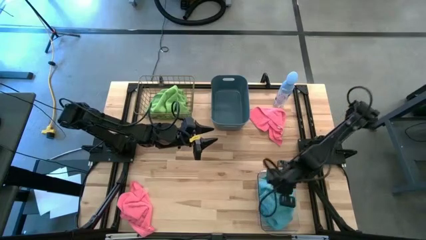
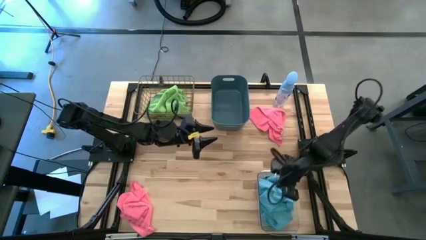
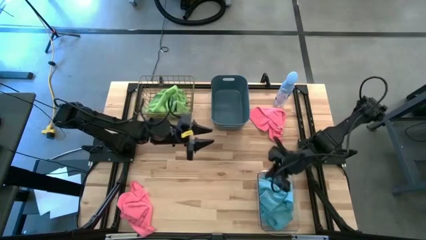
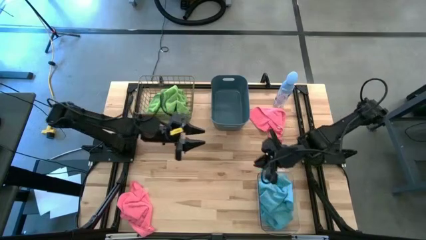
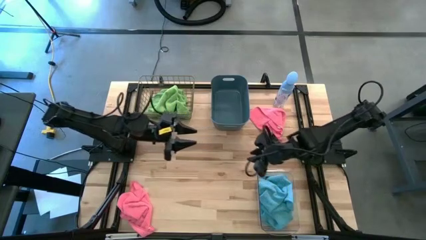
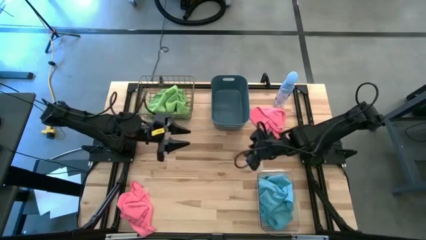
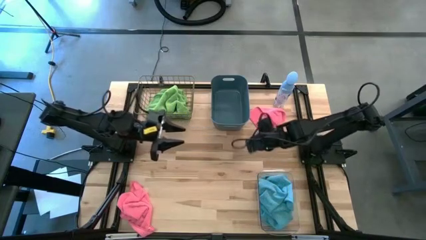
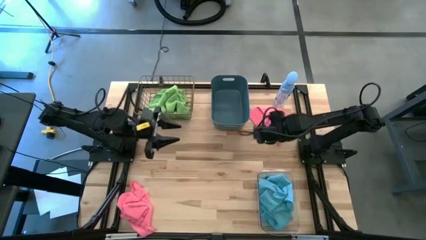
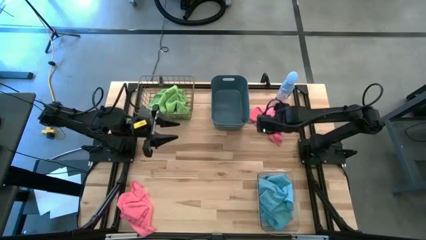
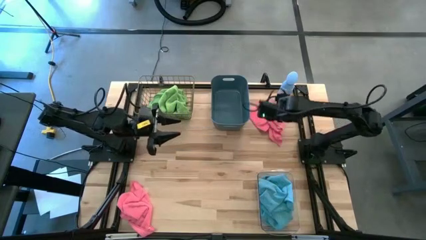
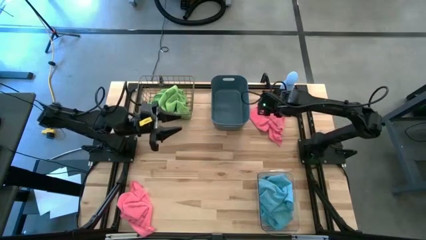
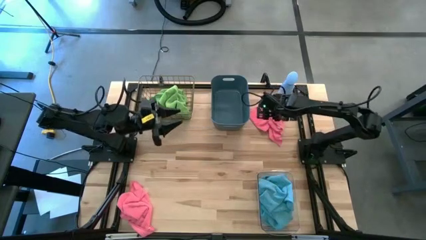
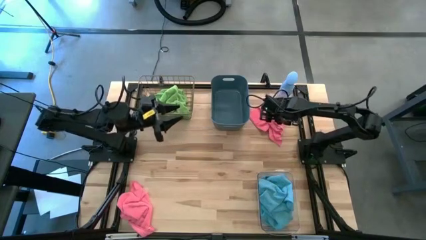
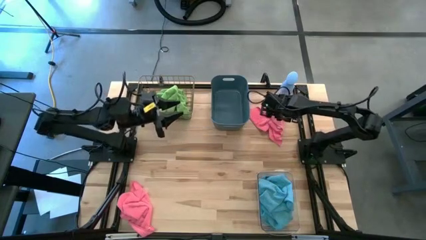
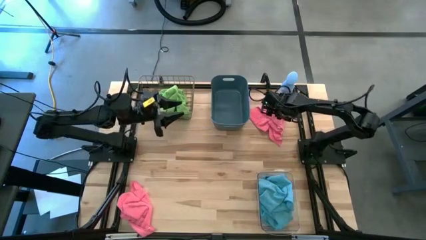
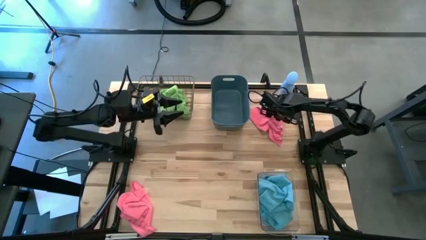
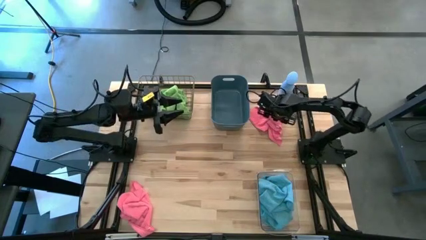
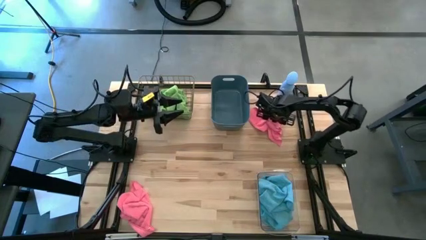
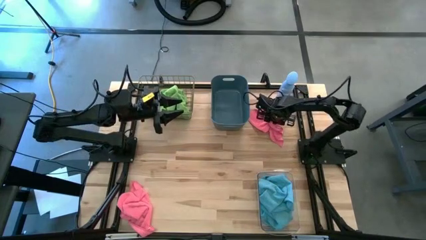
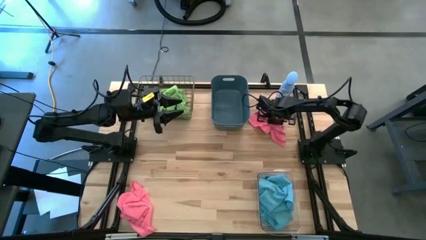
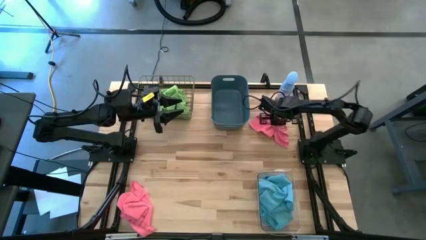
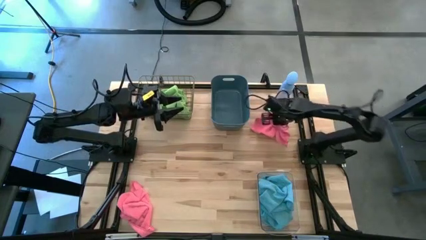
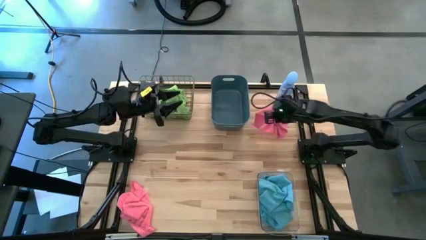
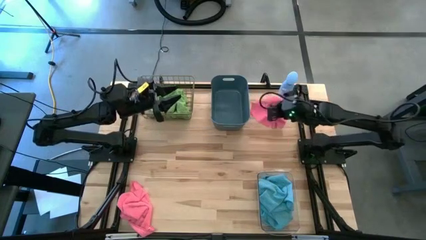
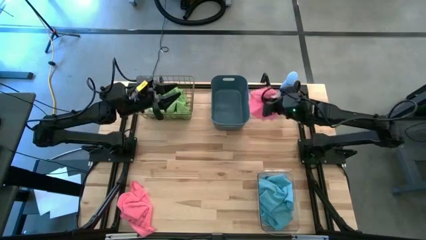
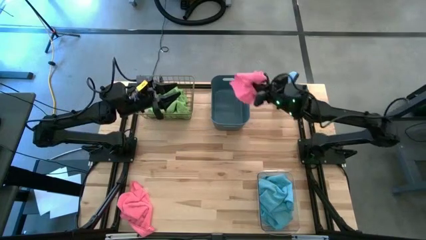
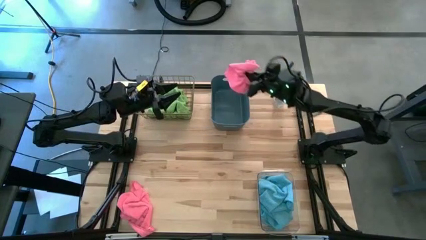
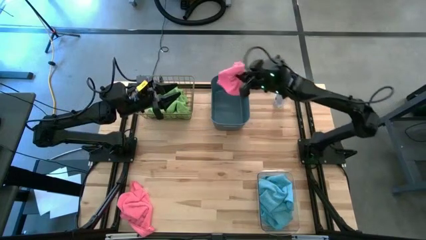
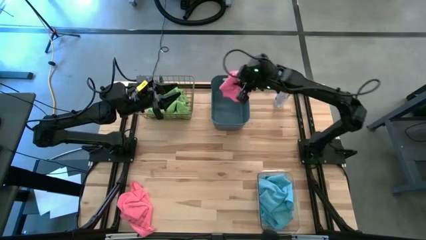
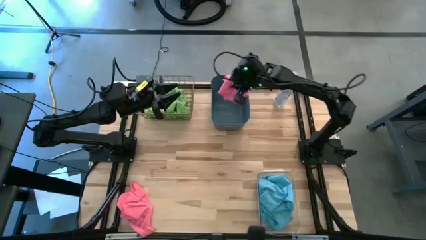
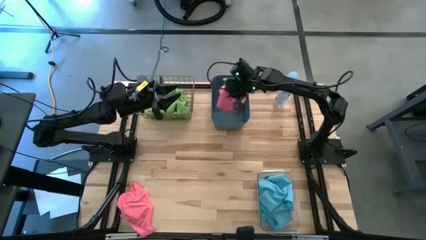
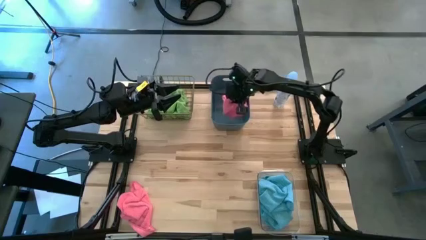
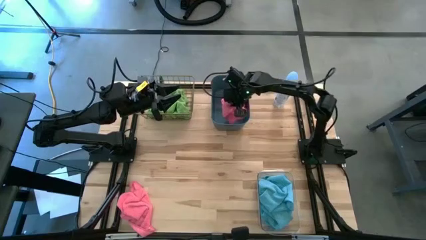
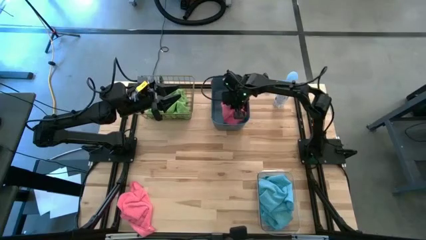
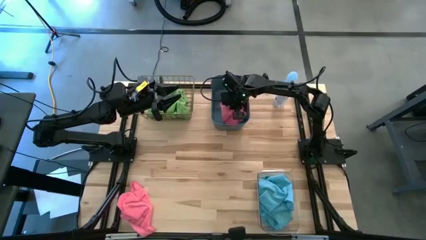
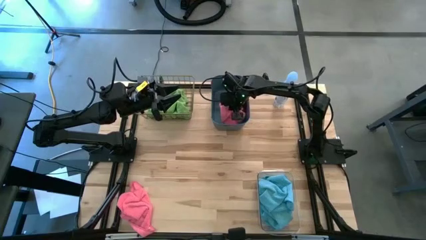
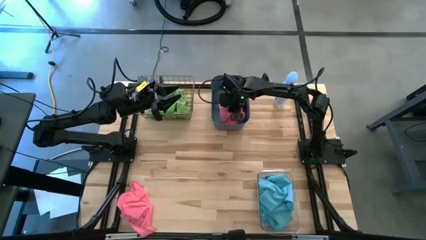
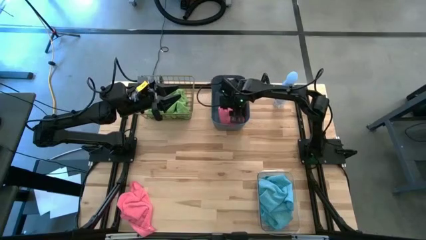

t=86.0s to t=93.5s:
Task: Sort microfiber towel by color & place in baskets
Put the top pink towel into the blue bin

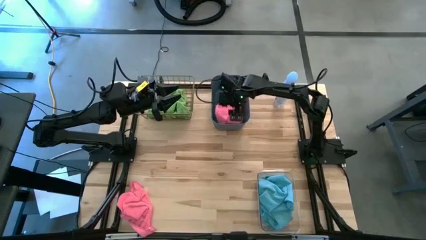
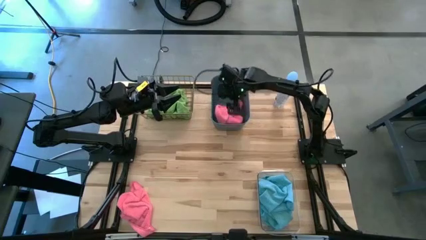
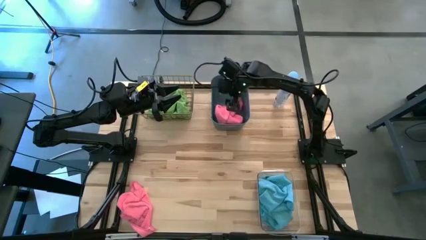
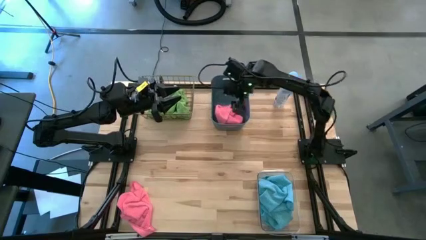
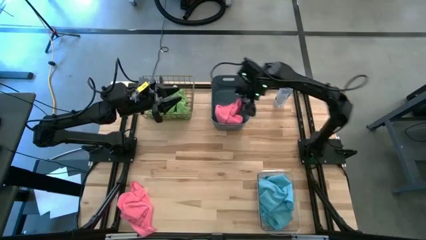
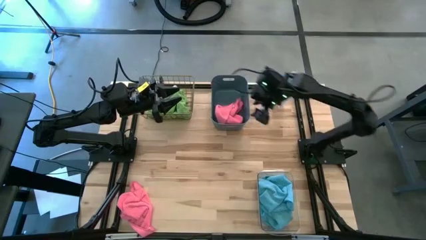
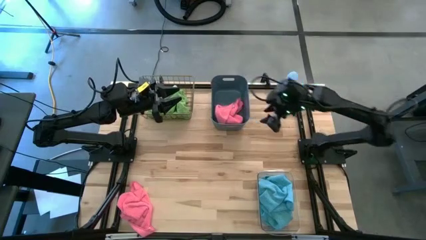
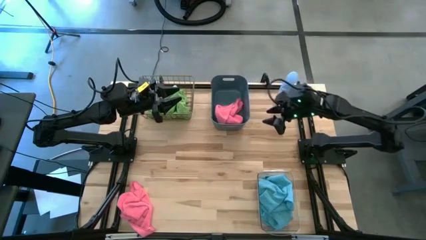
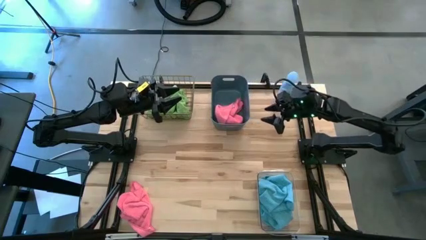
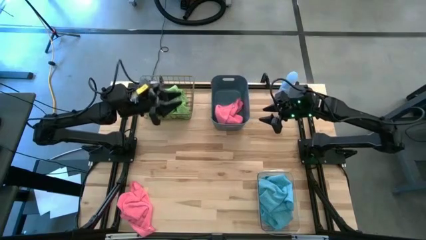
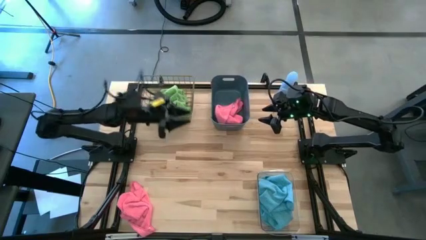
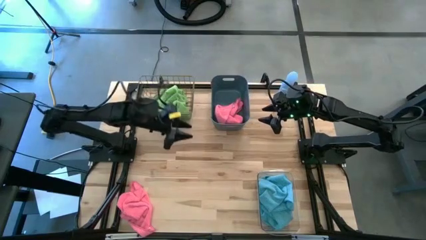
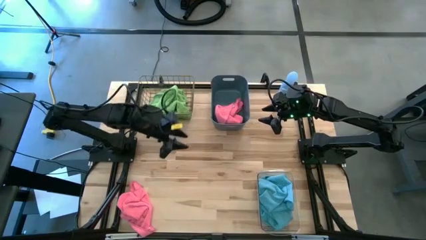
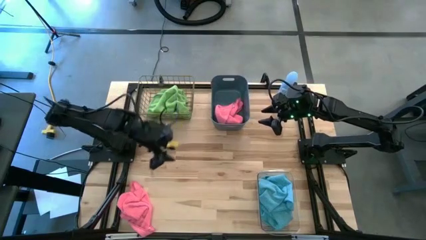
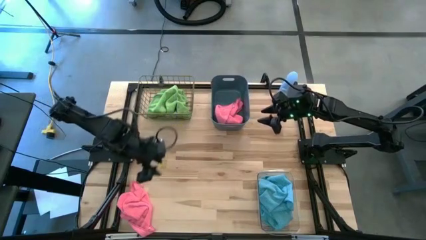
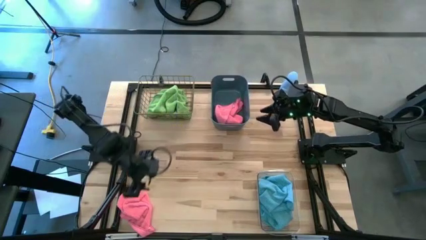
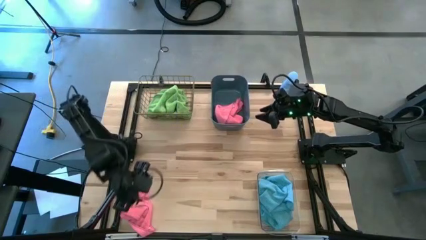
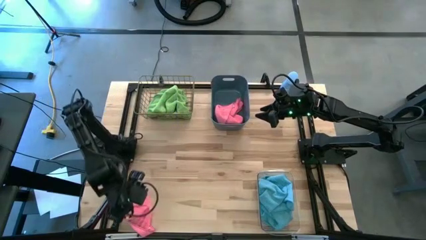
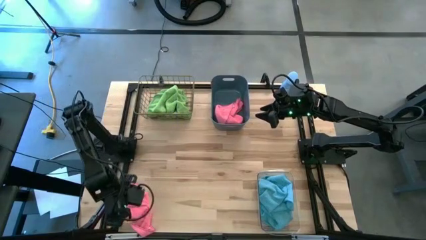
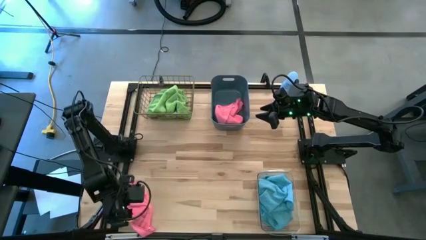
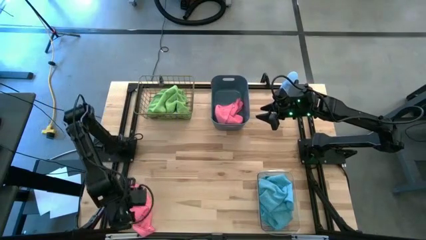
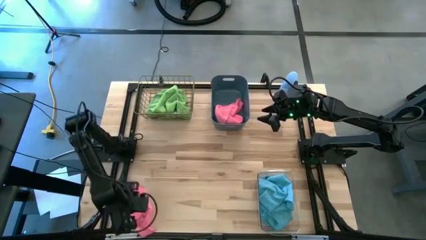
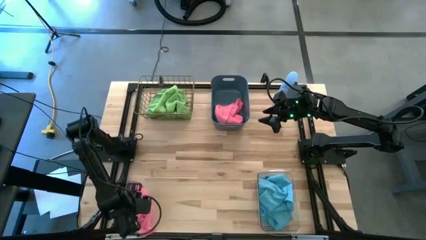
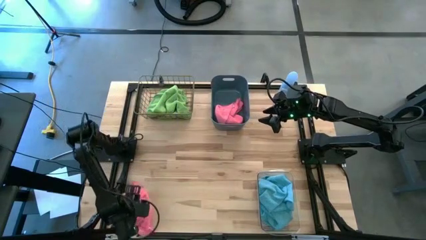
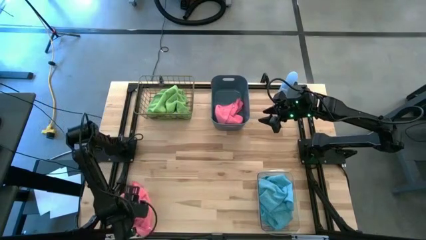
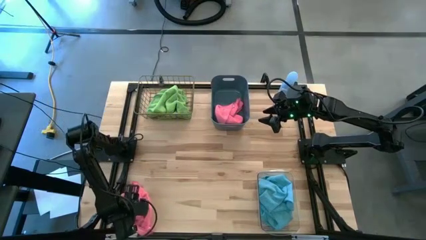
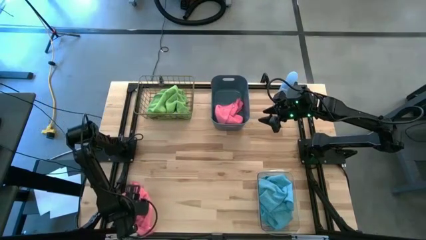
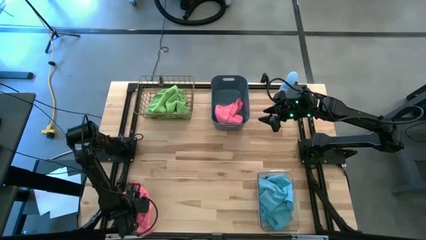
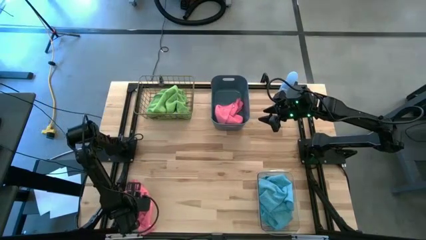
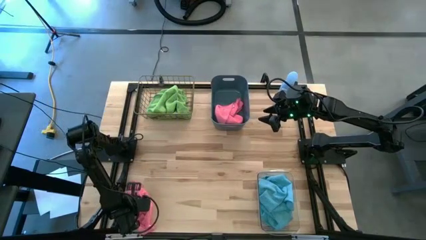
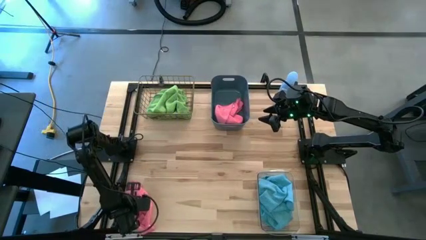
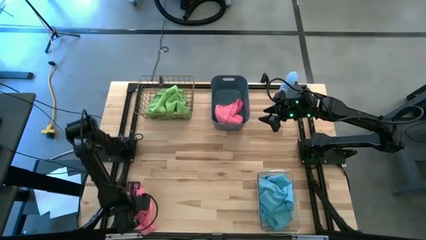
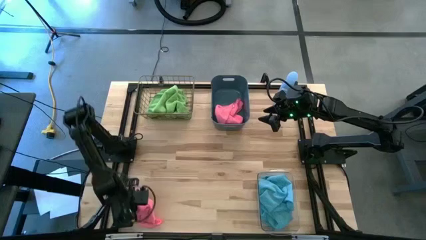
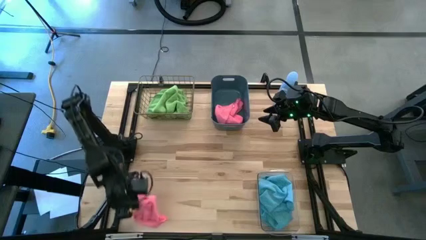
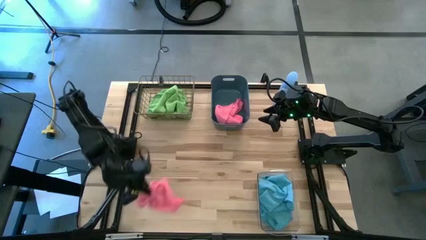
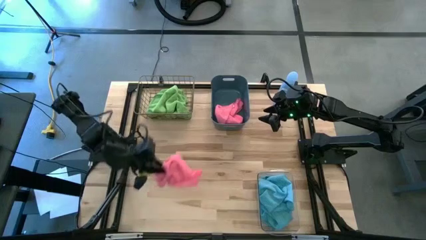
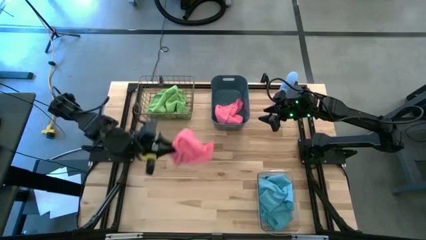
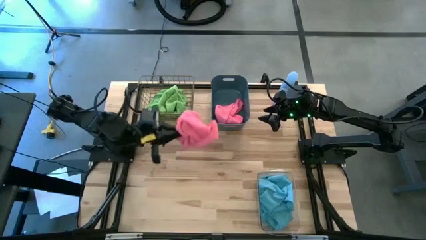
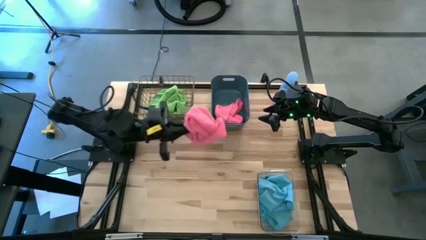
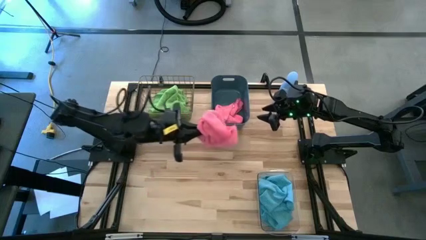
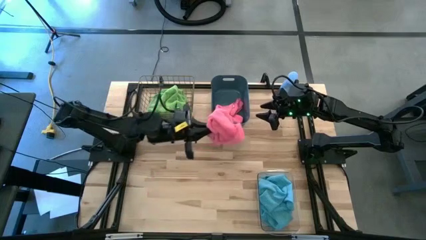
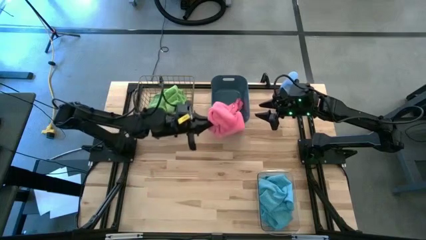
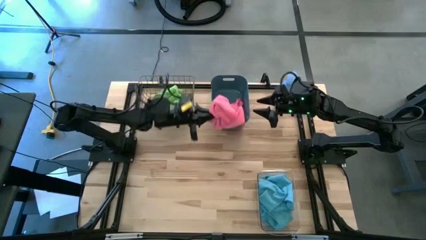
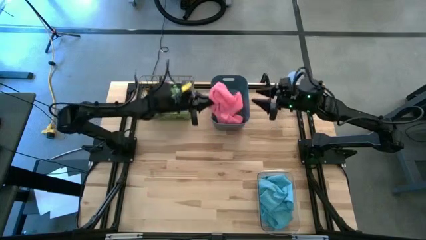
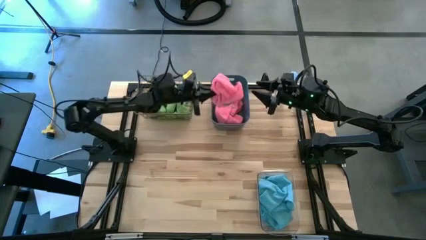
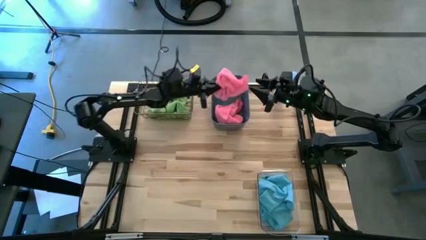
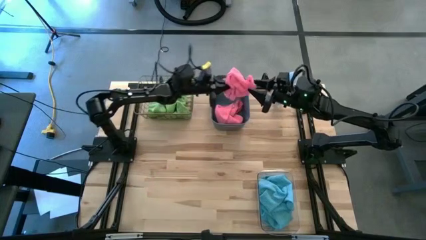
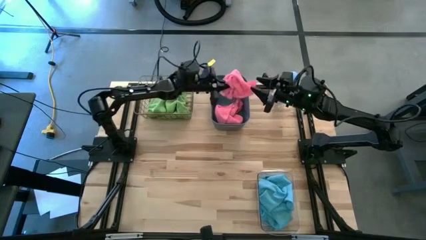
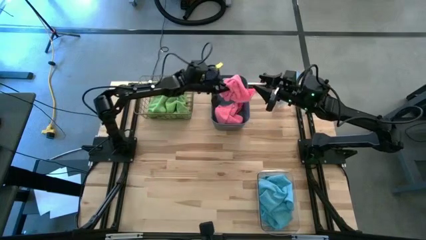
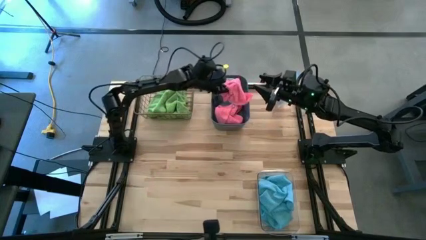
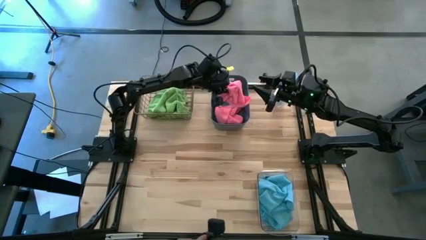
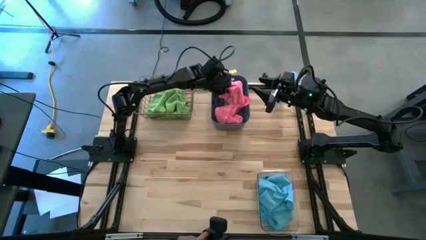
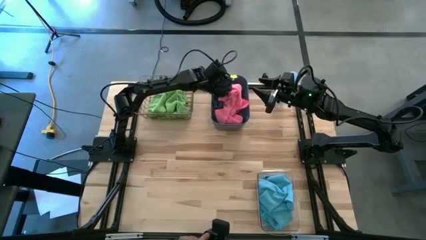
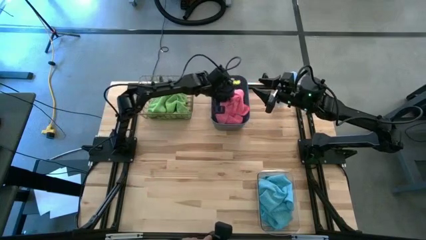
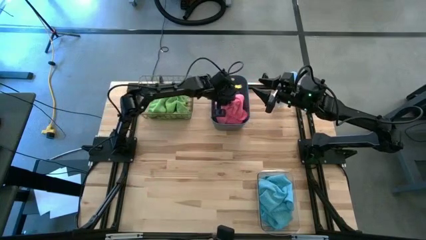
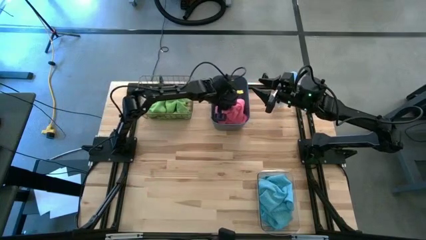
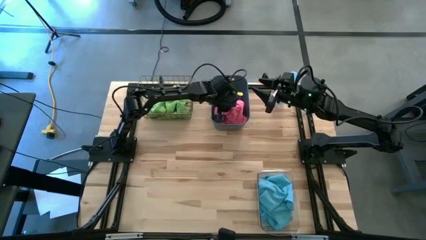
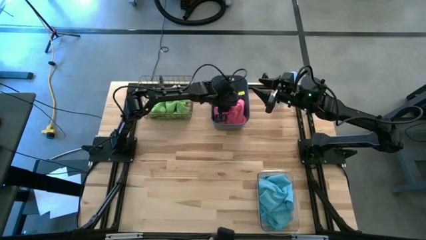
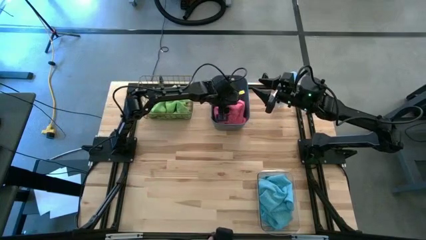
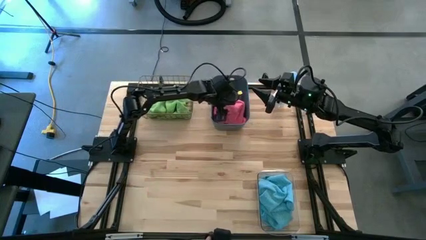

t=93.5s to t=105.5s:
Put the pink towel into the blue bin
